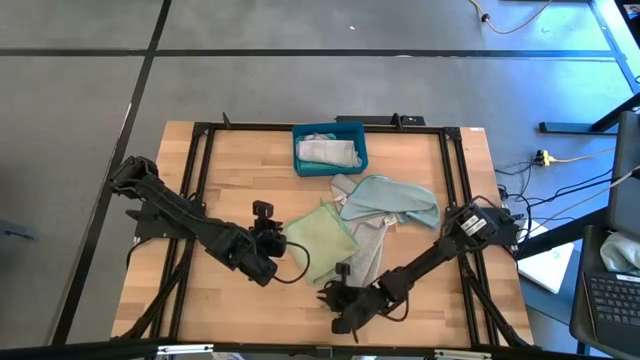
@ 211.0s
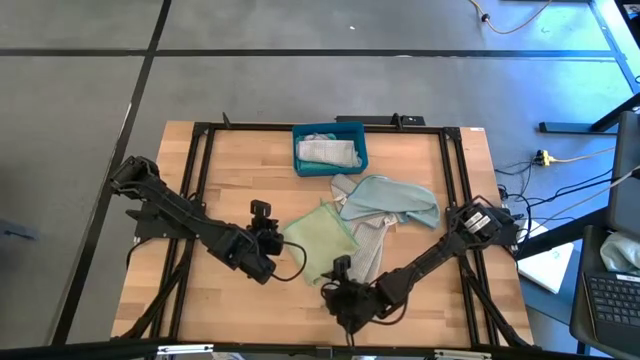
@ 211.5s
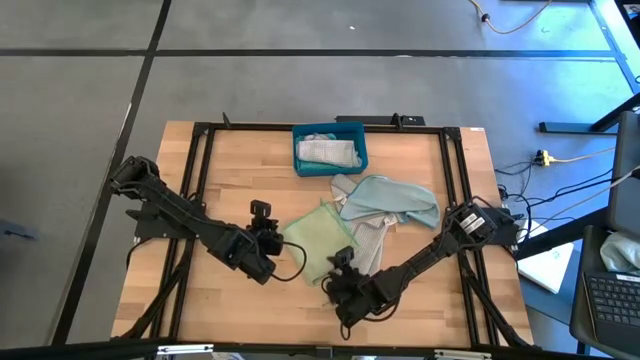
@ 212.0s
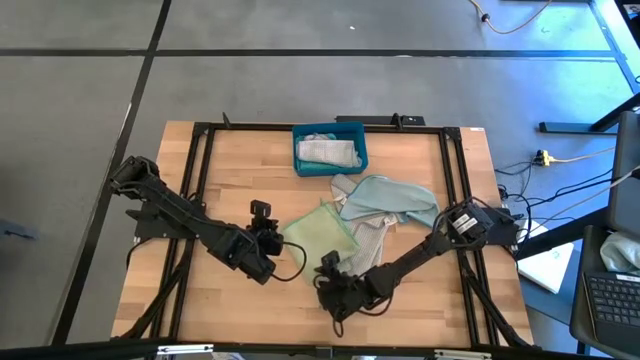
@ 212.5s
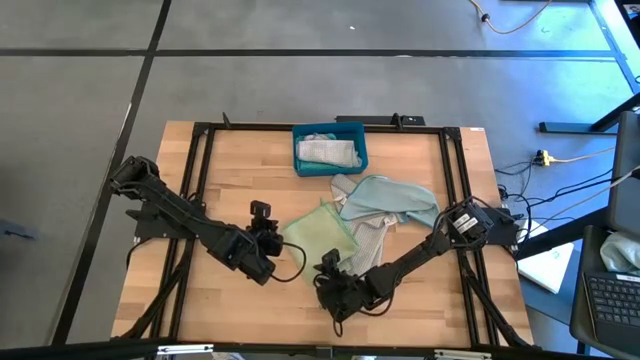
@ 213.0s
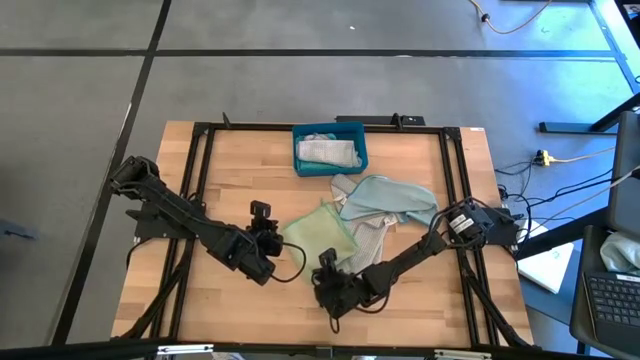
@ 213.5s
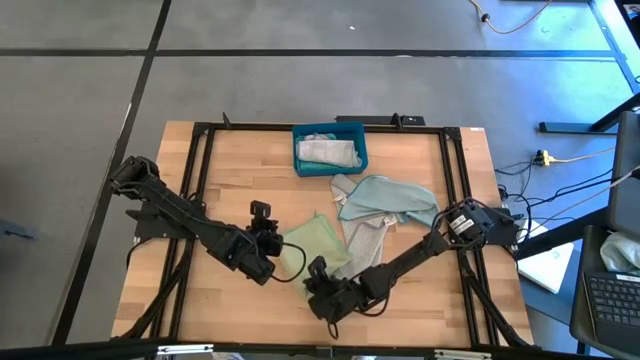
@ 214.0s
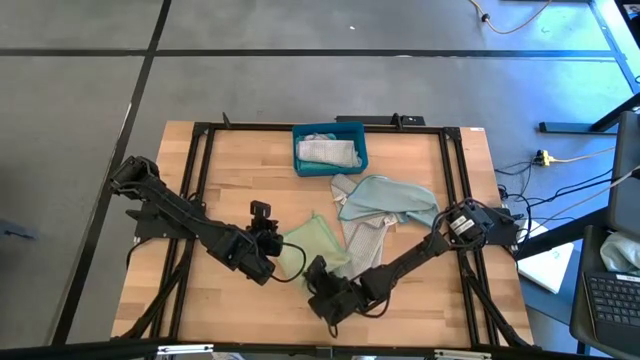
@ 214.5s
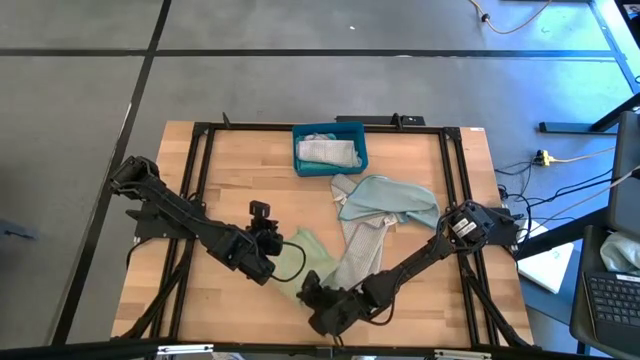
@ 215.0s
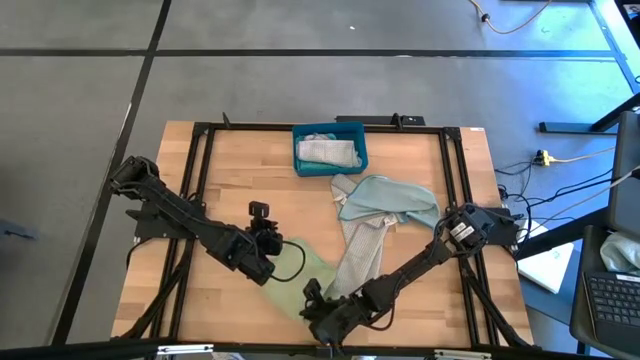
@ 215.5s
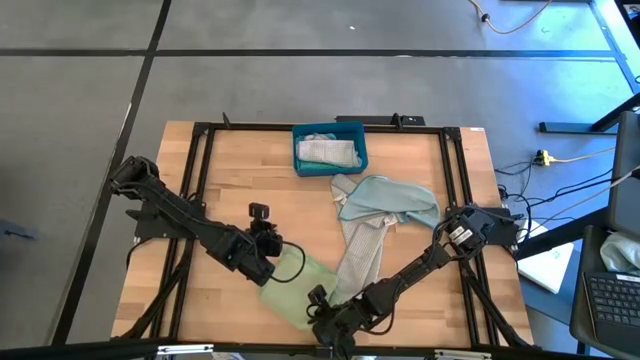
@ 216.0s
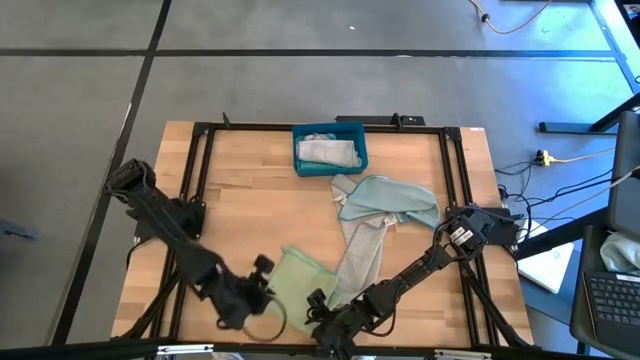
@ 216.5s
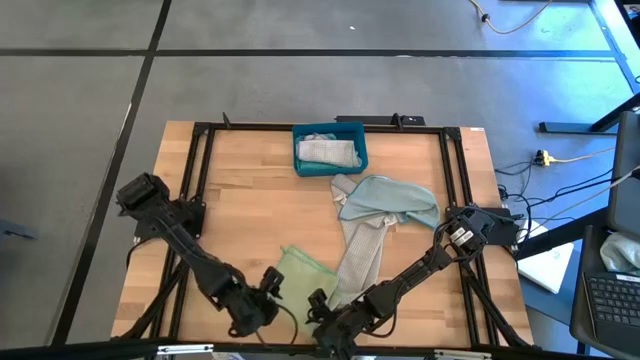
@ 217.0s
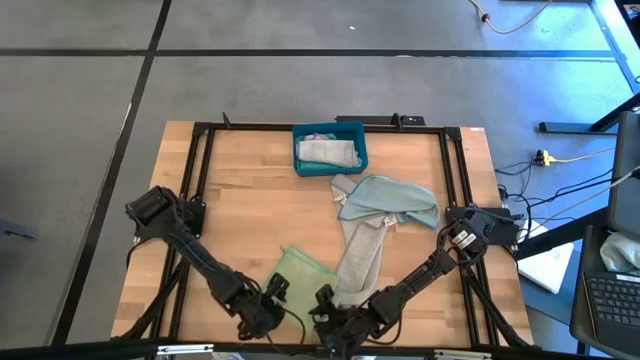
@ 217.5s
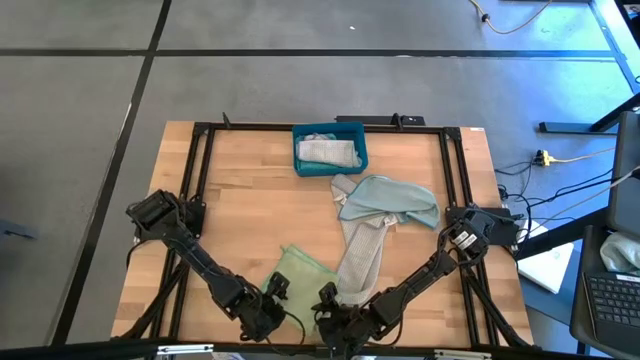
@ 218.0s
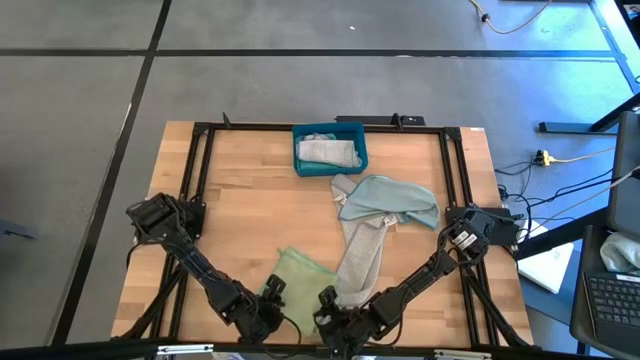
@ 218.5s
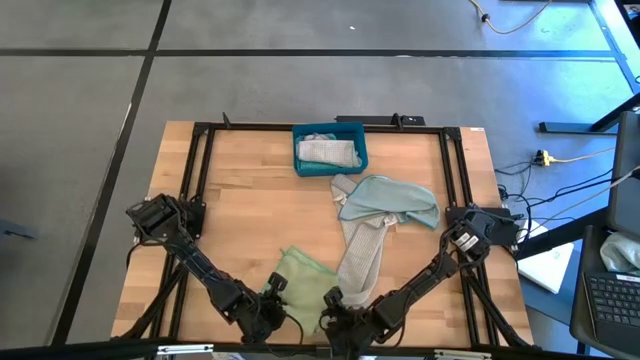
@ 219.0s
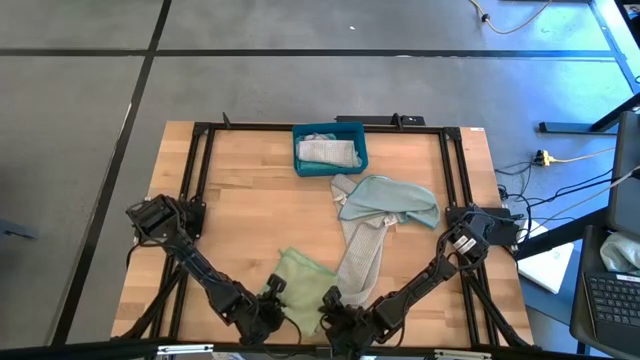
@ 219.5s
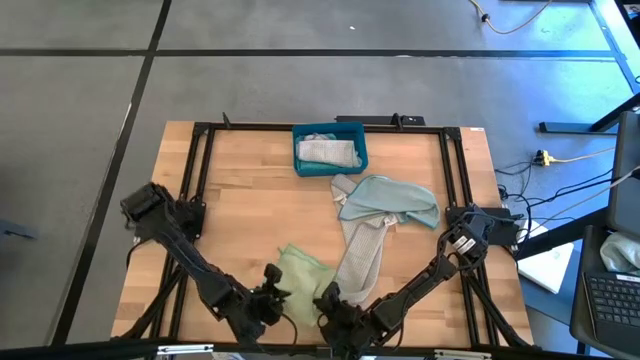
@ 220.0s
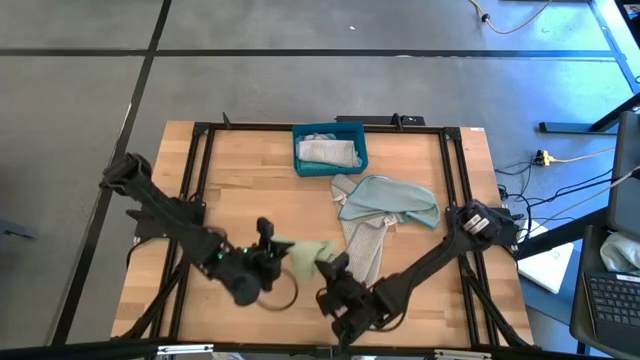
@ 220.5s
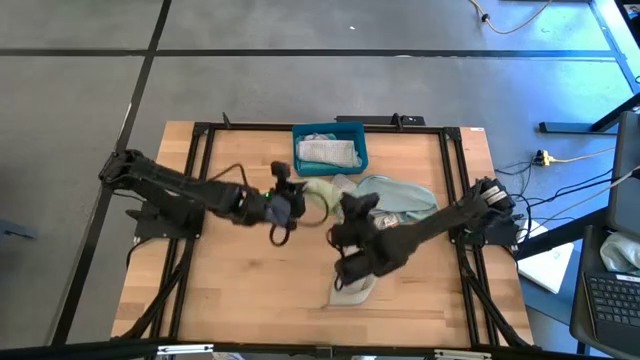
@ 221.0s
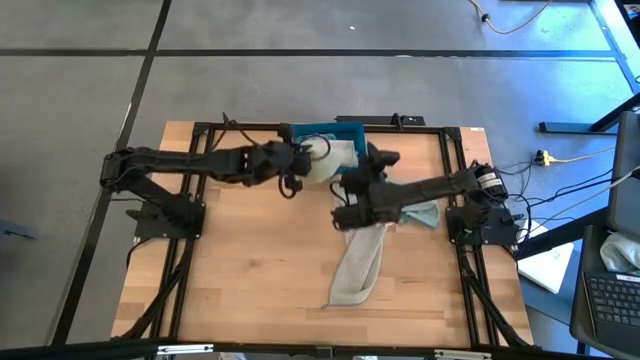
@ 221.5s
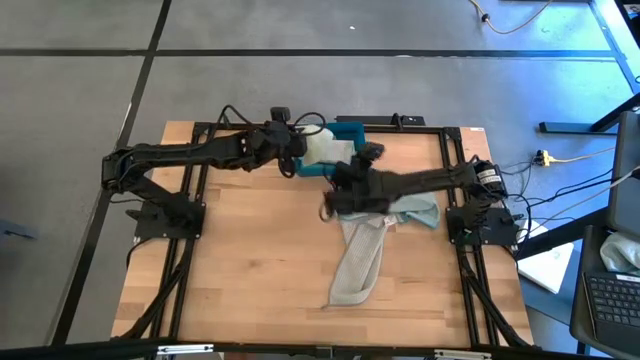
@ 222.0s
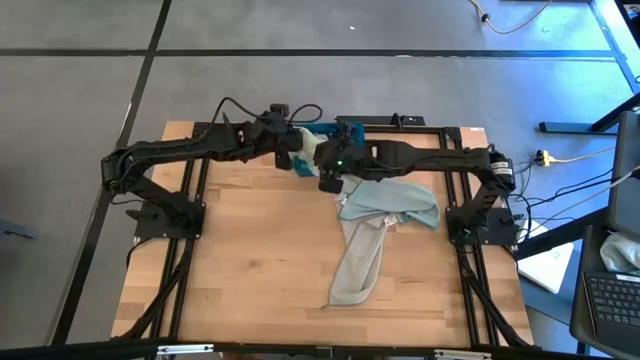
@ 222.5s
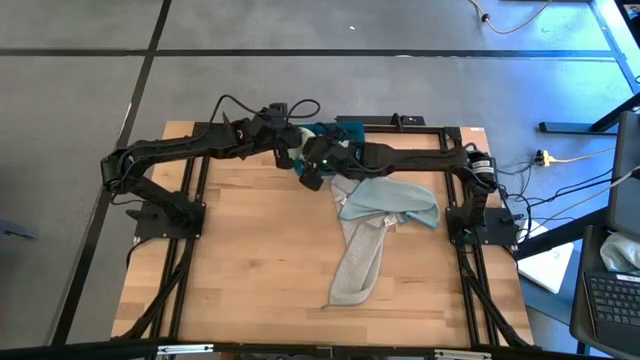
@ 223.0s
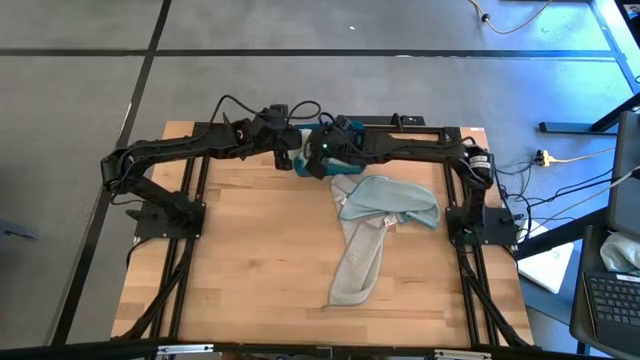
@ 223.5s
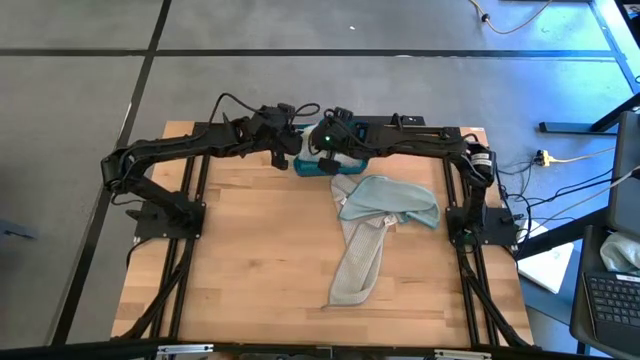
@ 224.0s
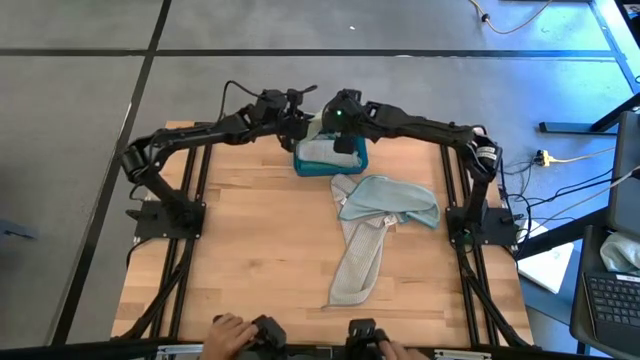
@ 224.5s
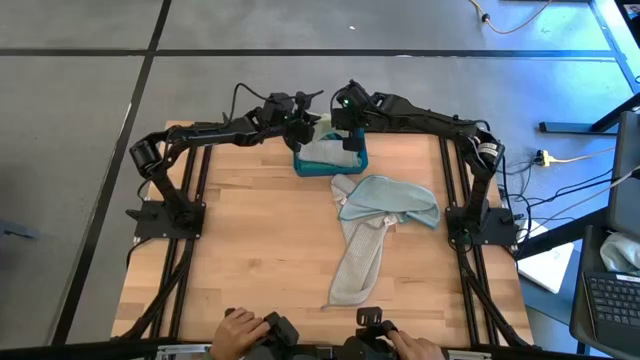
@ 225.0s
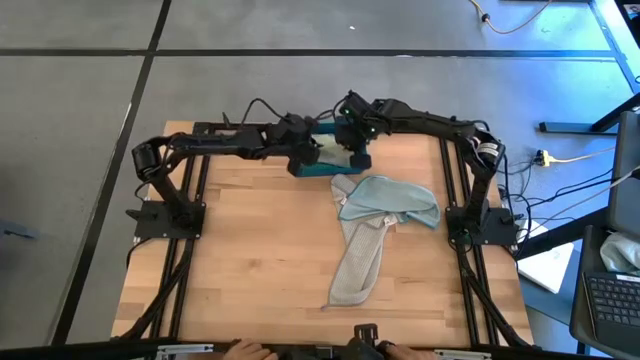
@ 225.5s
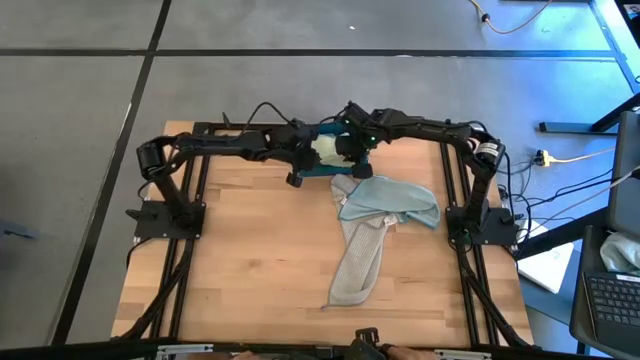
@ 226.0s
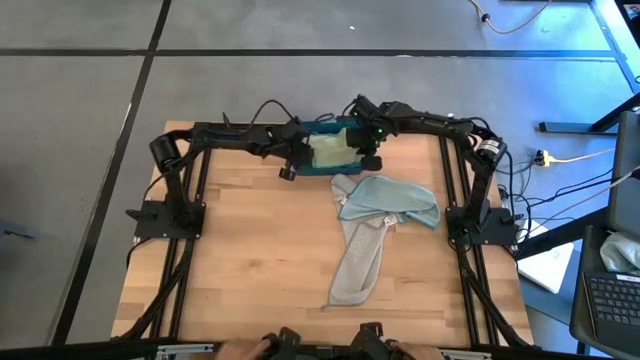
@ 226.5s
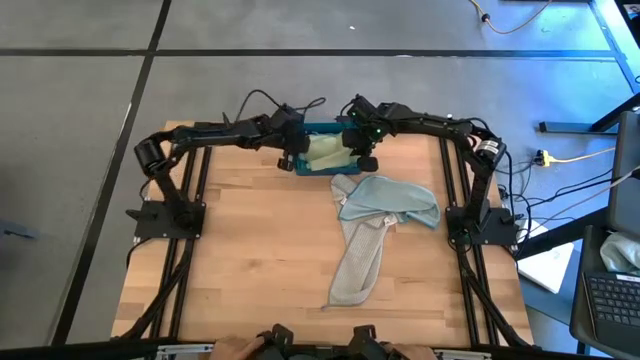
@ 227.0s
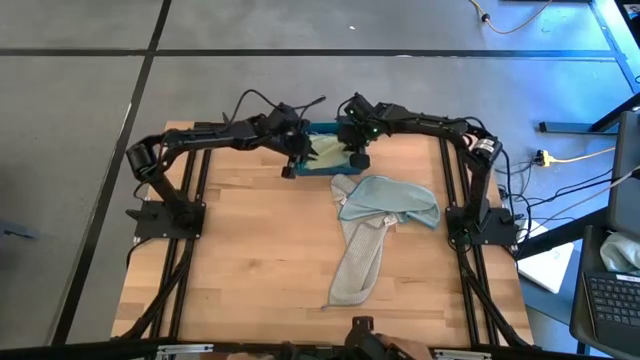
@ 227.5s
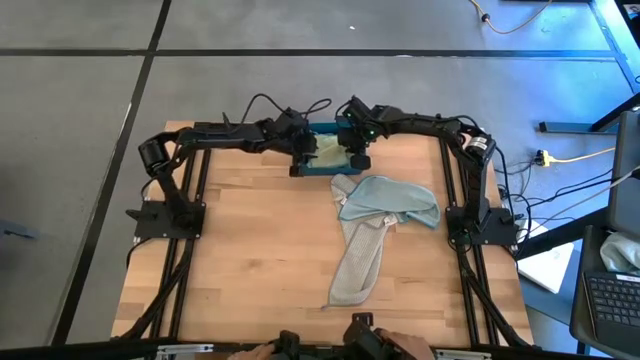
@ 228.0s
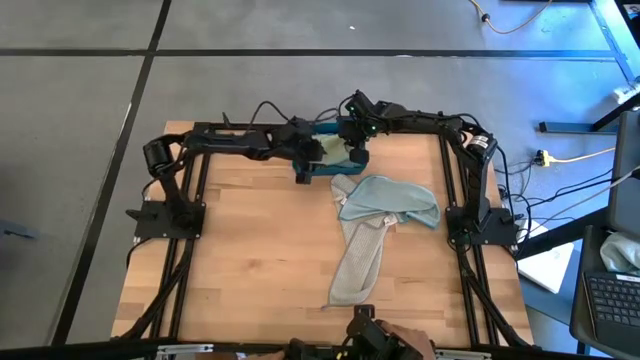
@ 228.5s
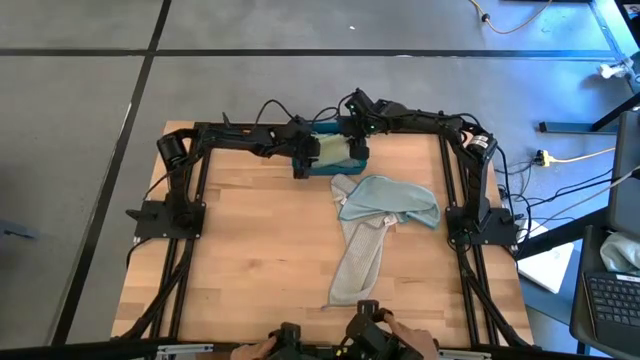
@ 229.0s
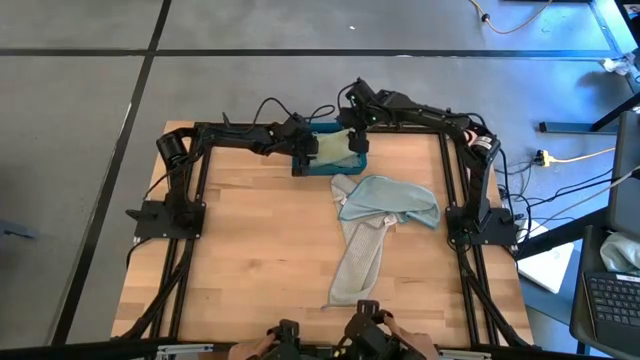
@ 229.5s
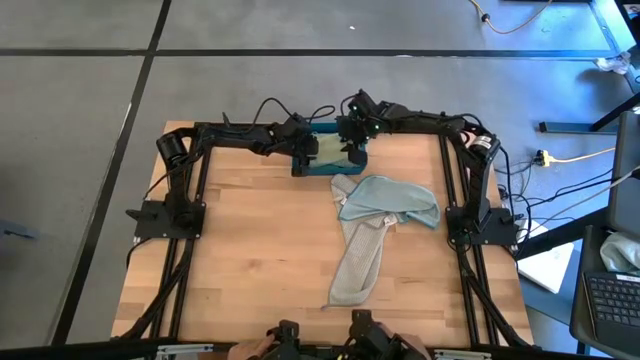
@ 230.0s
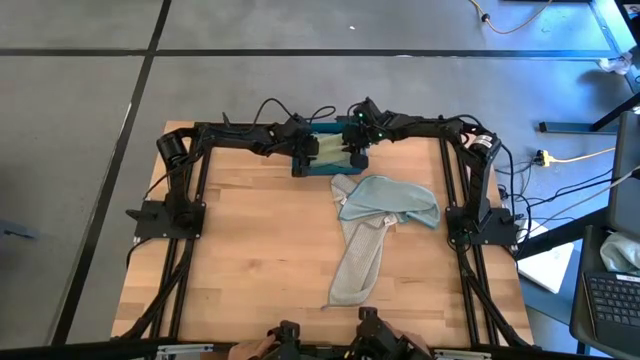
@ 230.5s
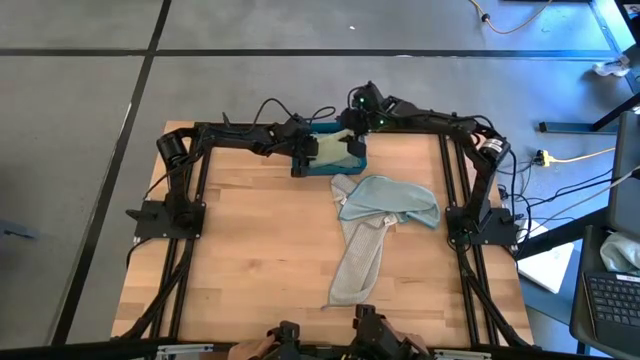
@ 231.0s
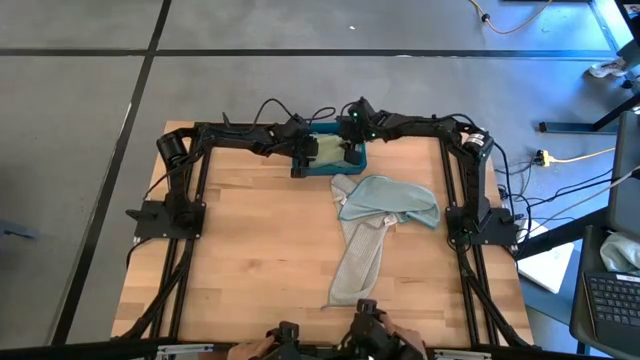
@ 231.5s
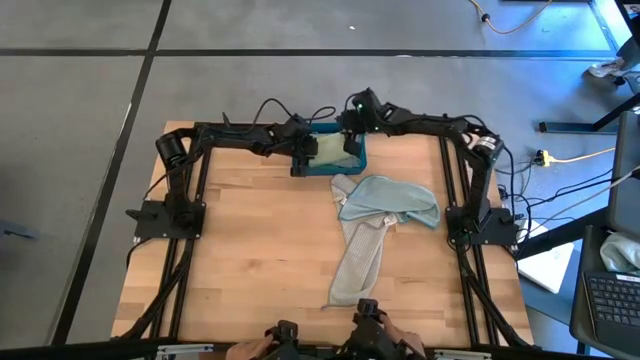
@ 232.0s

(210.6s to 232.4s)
Task: Fold microfiber towels
Put the folded green towel into the blue bin
